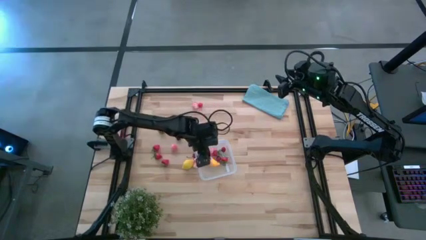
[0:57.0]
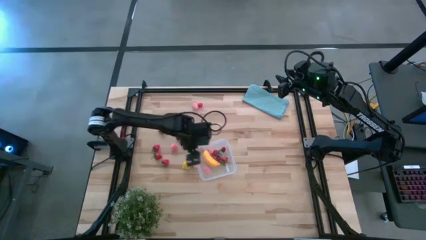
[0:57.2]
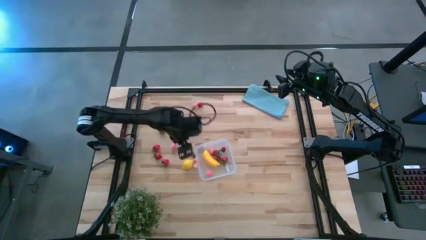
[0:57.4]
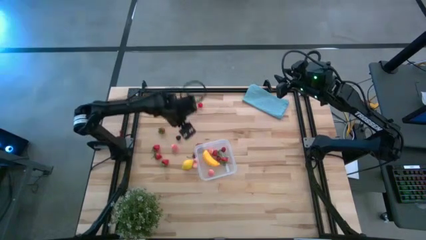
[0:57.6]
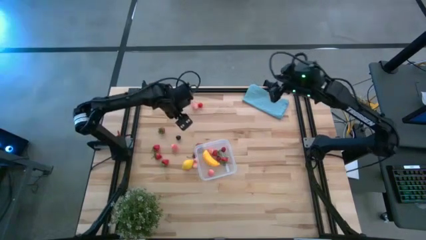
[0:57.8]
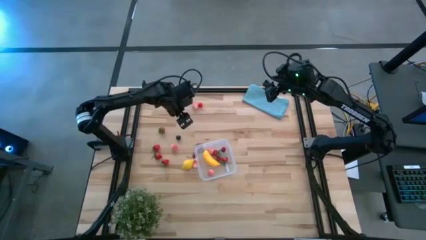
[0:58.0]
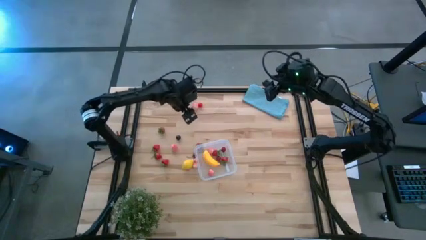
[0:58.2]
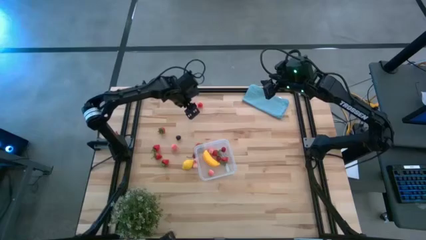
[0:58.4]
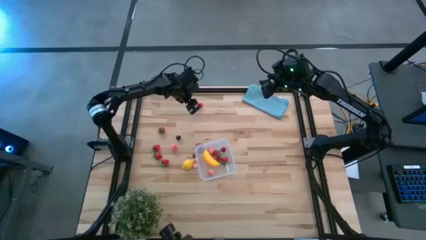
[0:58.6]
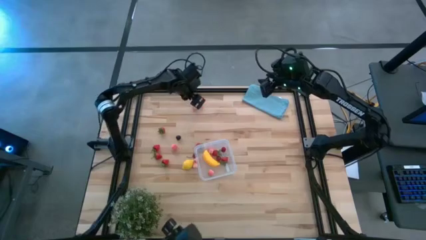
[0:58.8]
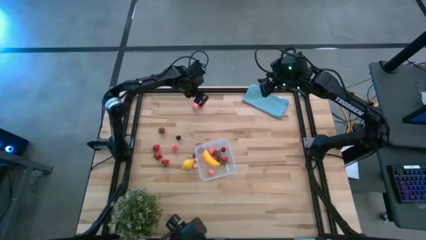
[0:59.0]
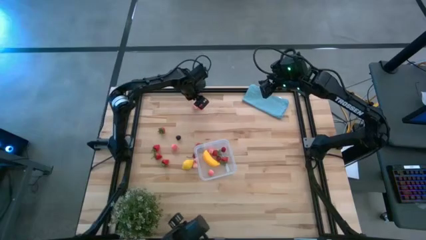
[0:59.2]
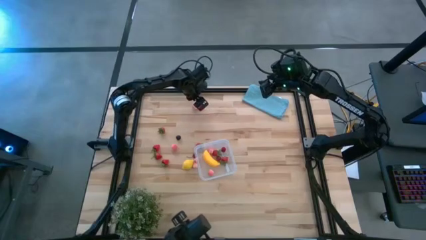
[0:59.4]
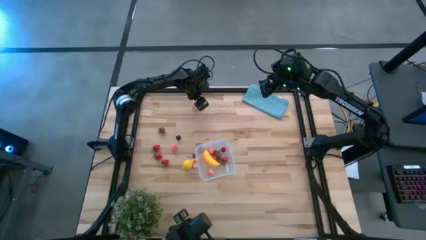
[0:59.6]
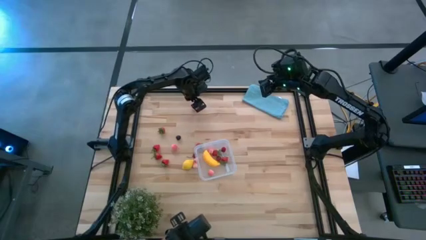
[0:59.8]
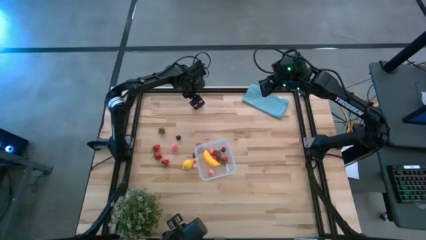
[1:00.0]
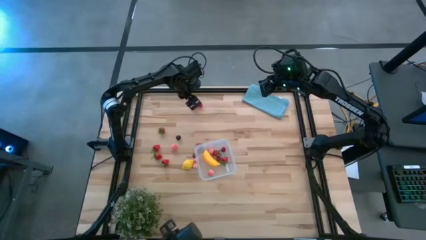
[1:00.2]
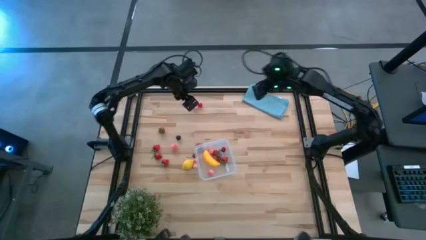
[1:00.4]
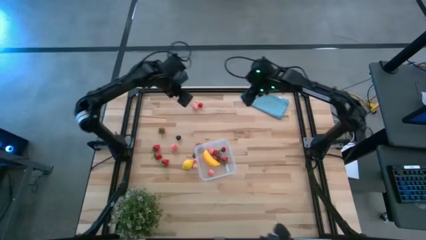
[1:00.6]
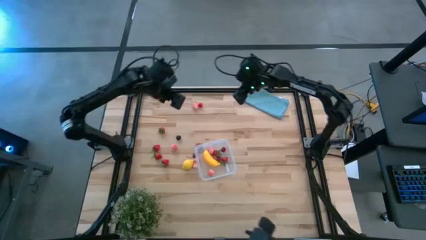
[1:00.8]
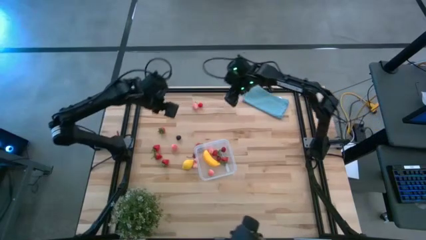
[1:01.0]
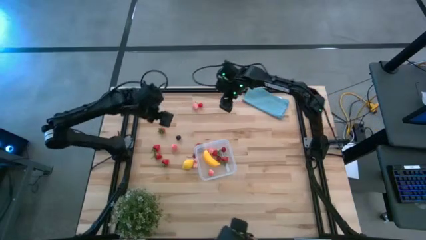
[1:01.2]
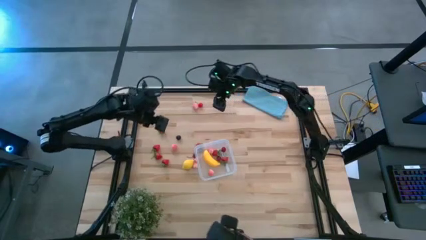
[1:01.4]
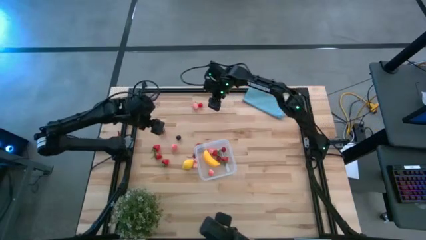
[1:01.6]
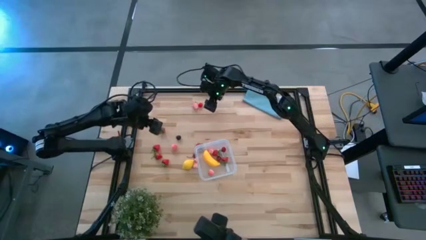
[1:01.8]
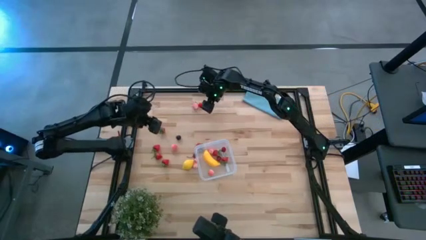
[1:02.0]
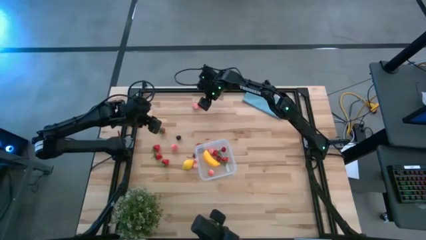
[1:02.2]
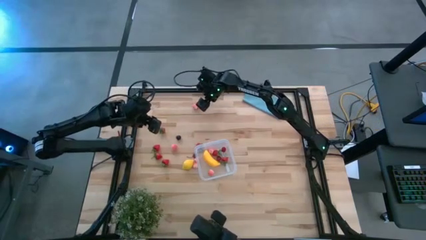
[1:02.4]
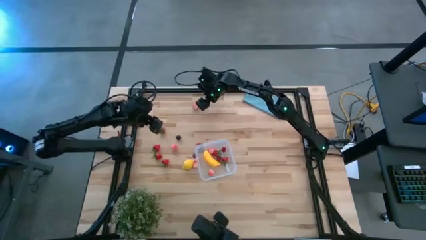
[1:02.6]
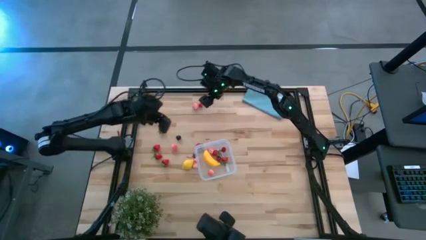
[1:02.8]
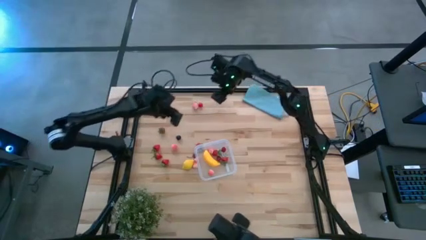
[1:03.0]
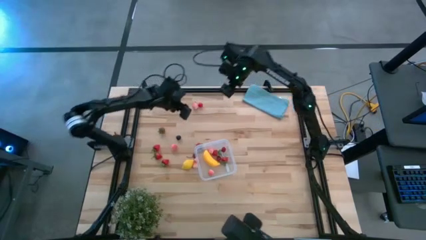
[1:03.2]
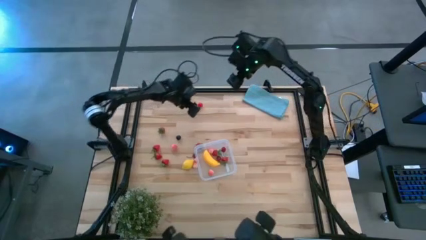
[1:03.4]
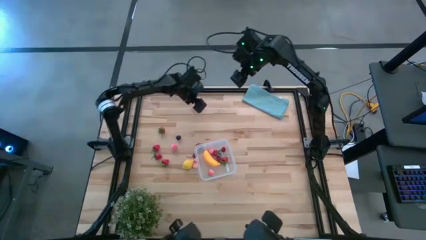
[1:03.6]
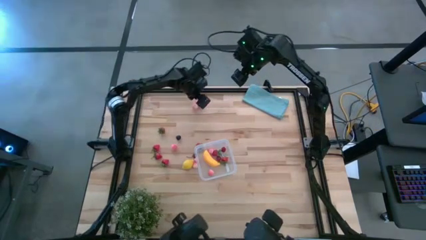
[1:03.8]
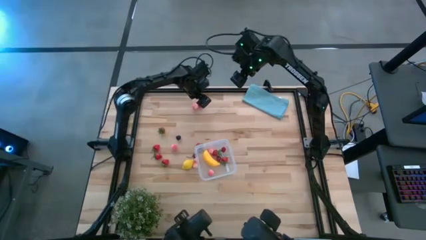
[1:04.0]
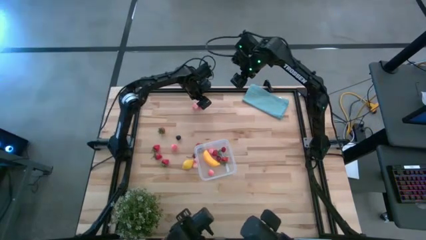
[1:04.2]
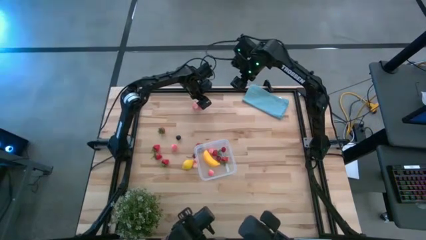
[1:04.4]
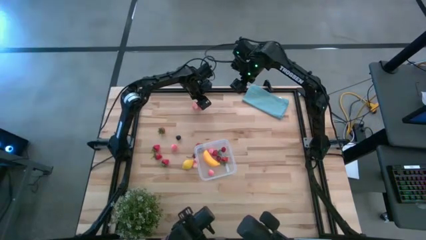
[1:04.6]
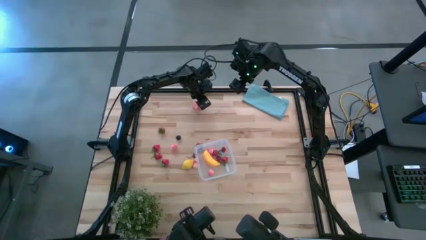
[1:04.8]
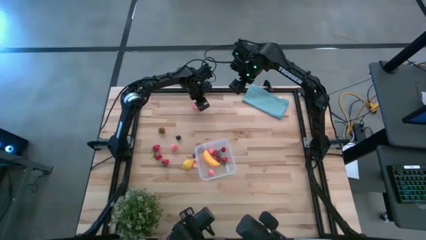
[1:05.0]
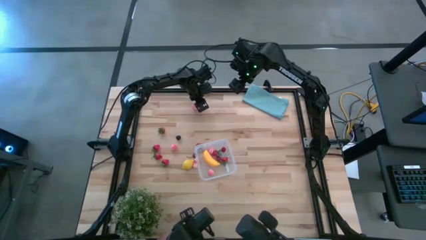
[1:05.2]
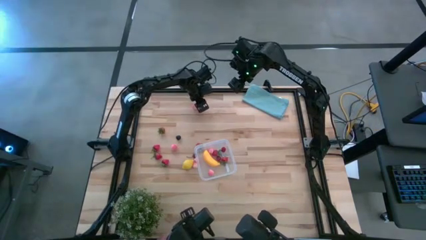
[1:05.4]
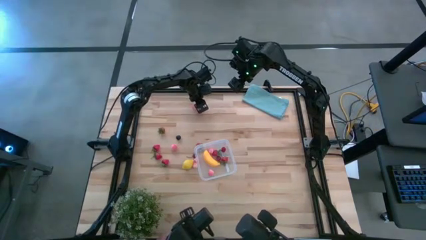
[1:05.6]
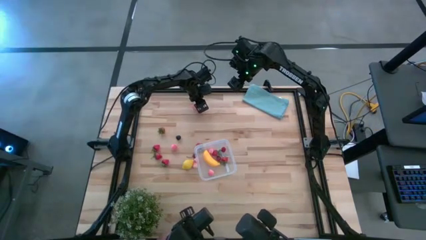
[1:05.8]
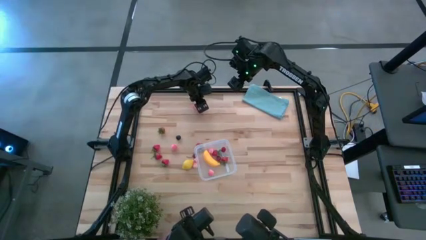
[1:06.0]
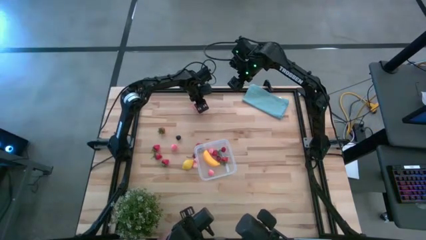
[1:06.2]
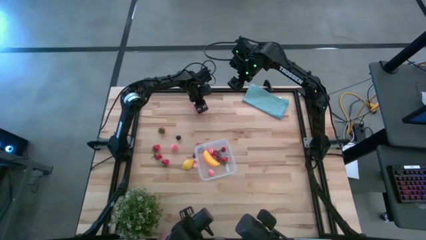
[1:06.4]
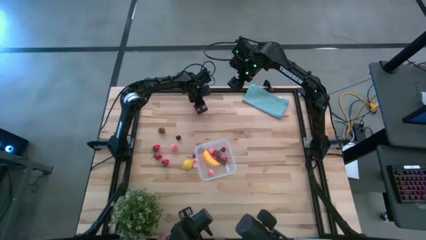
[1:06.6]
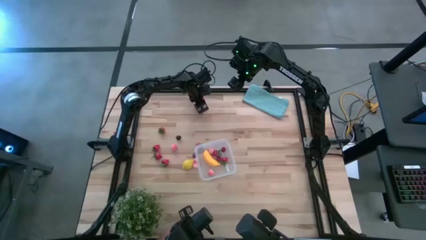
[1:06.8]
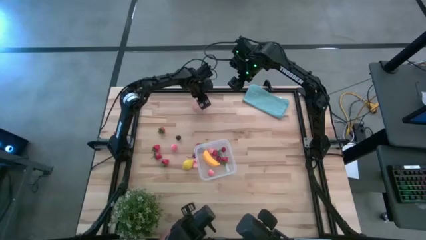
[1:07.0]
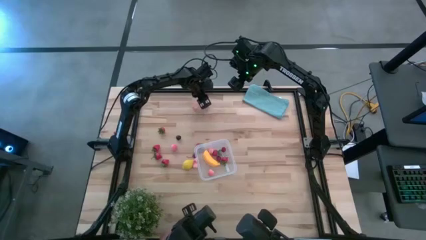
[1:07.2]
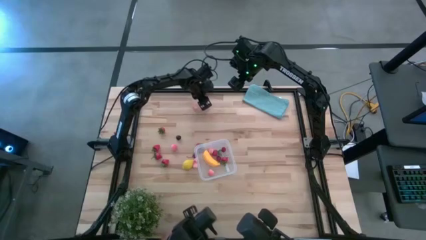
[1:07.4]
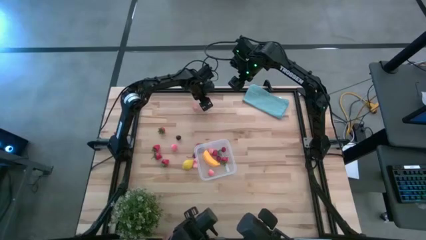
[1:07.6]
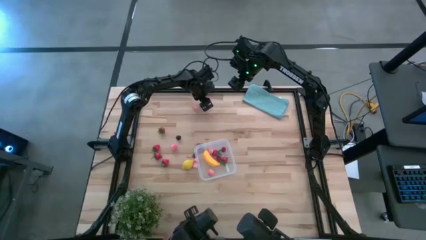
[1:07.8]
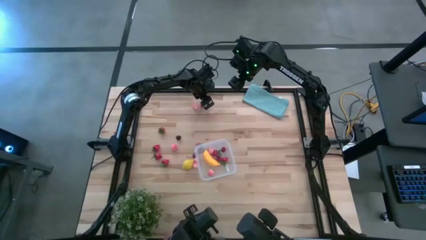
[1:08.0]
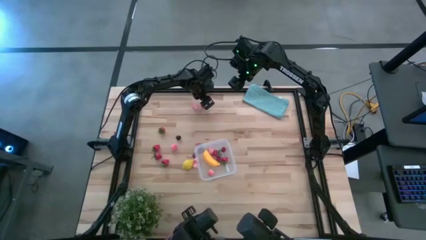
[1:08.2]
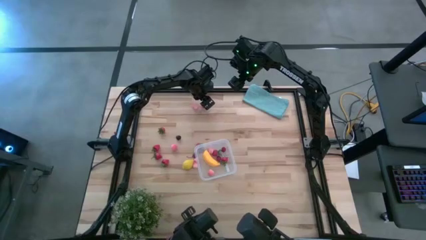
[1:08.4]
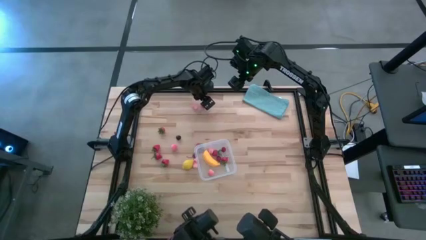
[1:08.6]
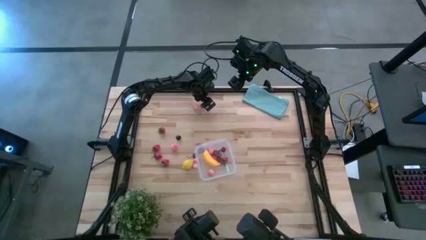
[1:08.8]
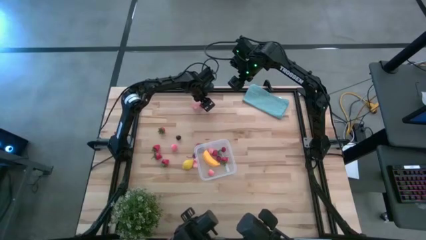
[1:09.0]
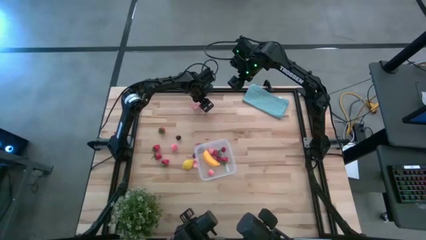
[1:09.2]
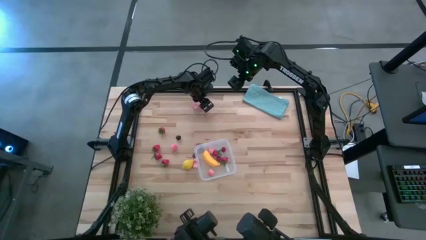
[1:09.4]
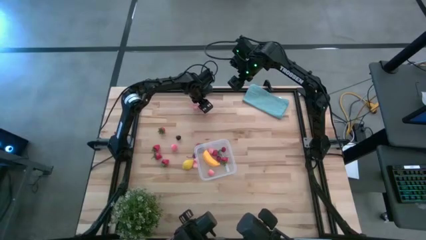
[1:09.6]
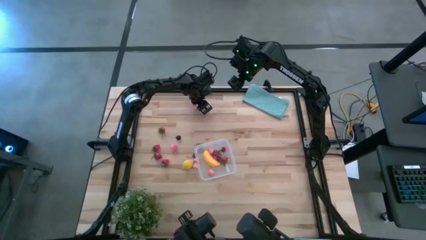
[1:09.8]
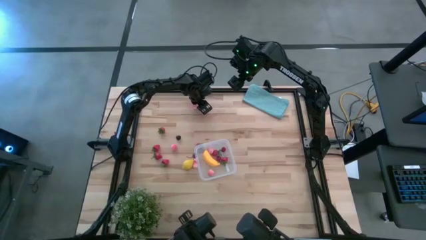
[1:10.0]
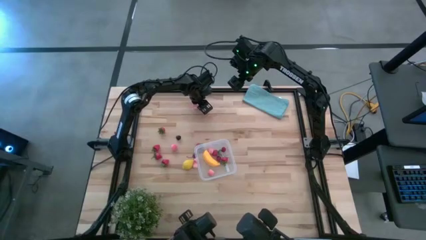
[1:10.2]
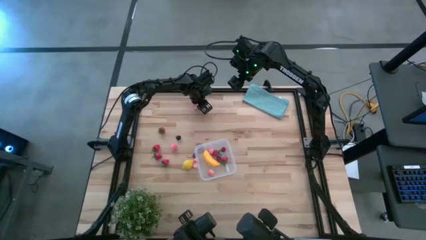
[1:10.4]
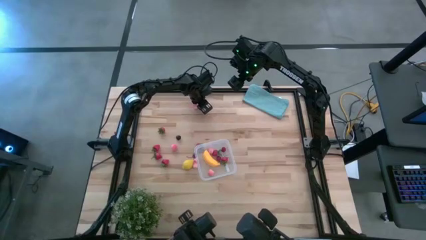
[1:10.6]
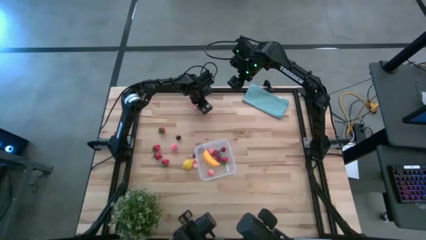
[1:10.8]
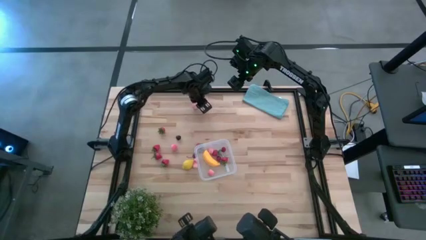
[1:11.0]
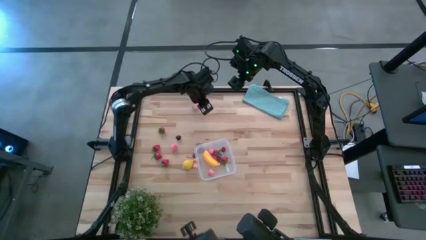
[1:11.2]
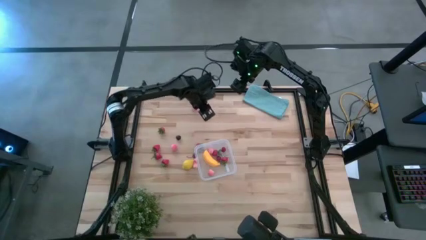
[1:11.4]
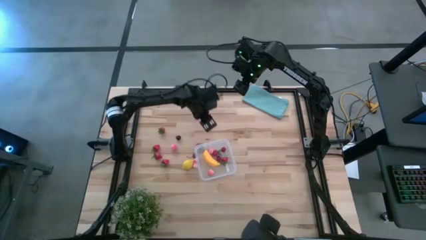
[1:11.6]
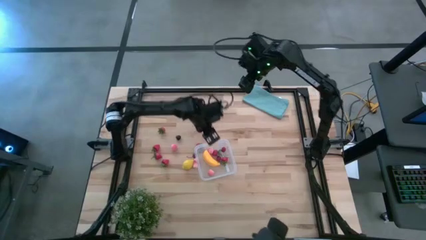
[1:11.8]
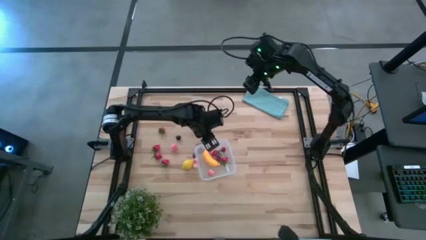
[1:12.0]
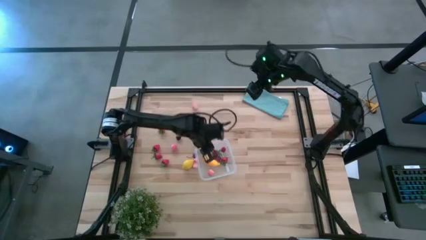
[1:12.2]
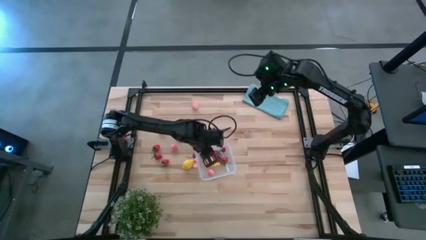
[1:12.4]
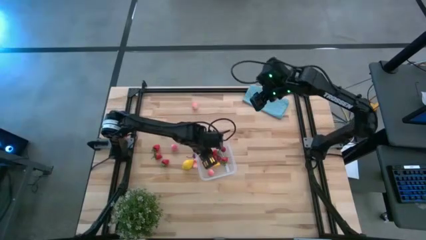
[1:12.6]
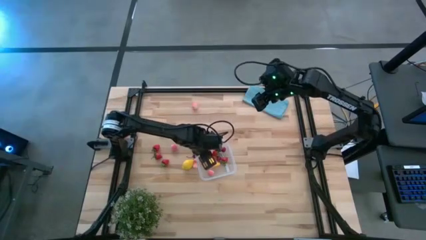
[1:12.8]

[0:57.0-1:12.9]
Task: Pick and placing Produce into tupperware
Put the red cherry into the transparent bin
